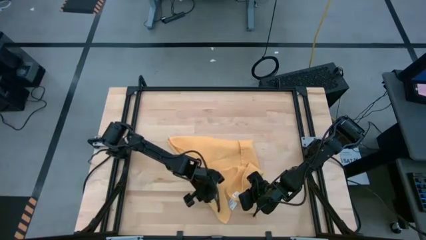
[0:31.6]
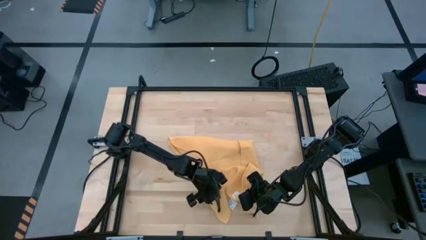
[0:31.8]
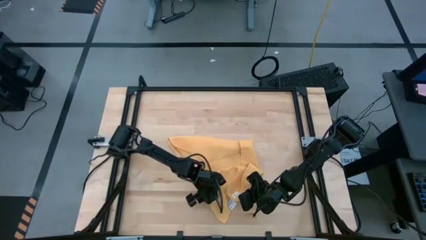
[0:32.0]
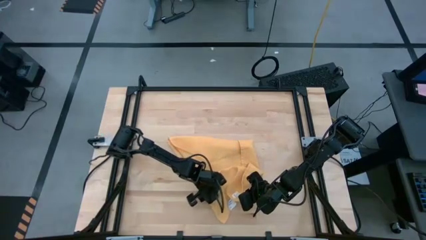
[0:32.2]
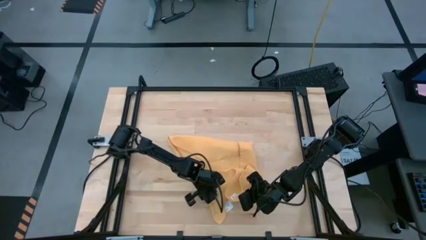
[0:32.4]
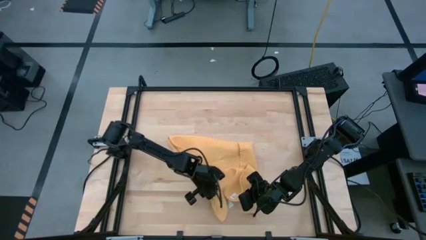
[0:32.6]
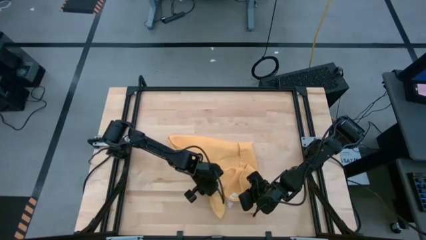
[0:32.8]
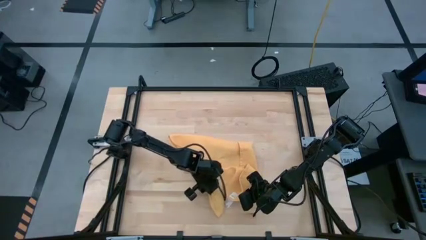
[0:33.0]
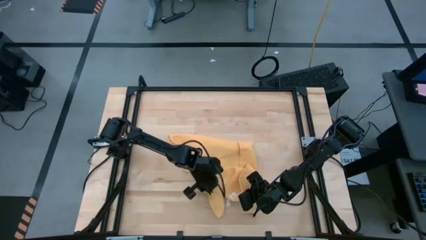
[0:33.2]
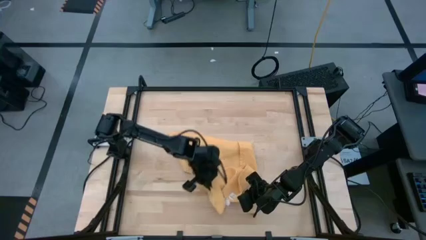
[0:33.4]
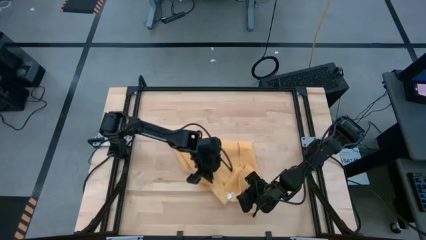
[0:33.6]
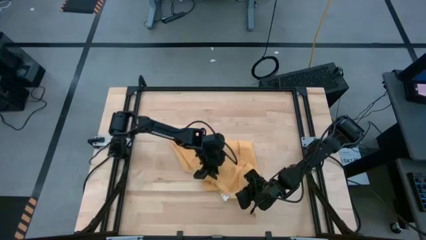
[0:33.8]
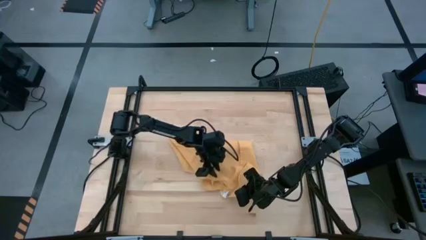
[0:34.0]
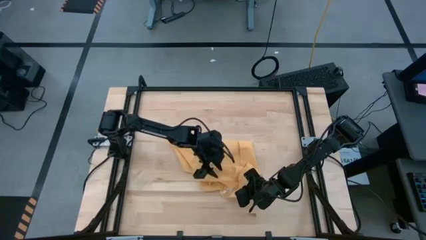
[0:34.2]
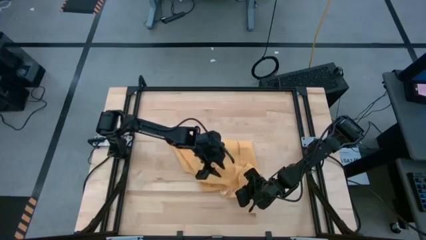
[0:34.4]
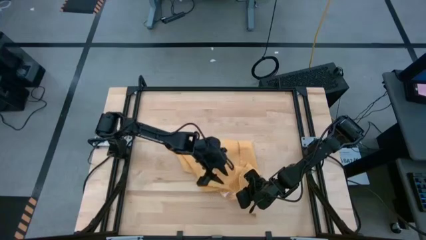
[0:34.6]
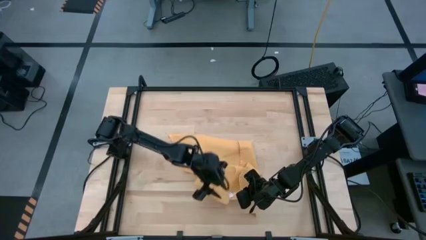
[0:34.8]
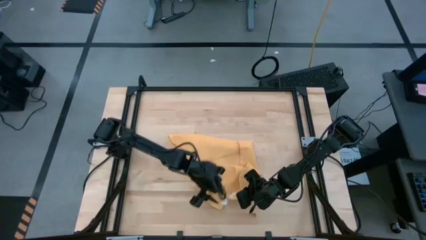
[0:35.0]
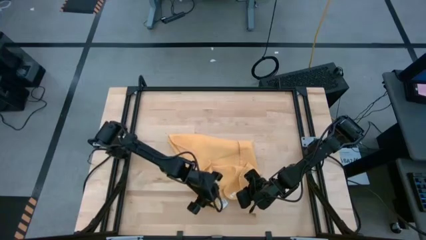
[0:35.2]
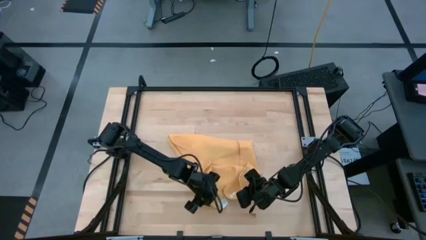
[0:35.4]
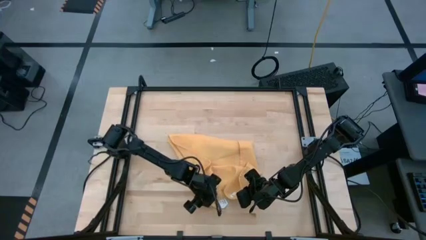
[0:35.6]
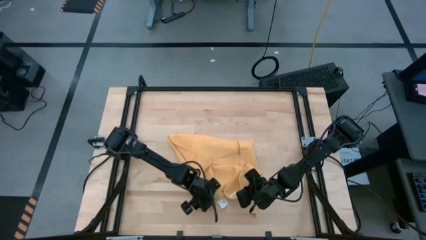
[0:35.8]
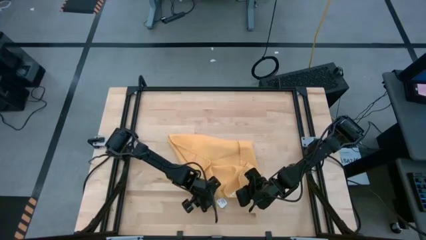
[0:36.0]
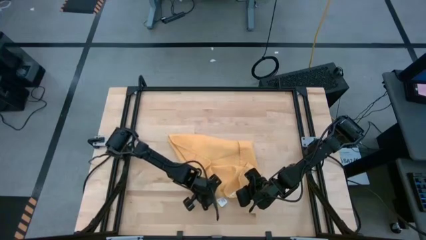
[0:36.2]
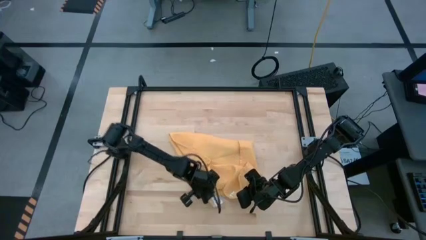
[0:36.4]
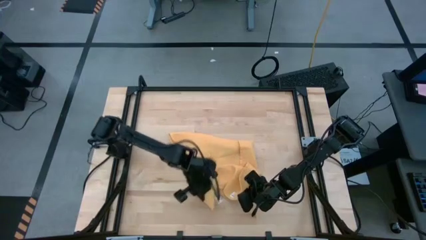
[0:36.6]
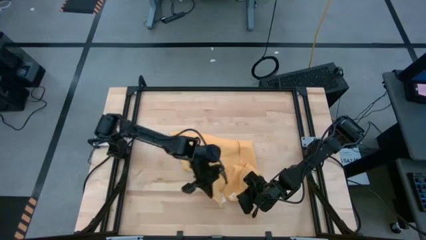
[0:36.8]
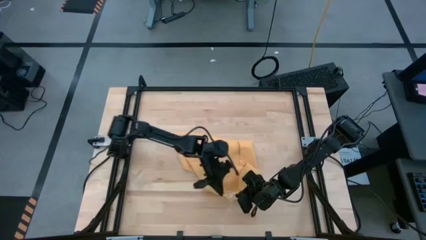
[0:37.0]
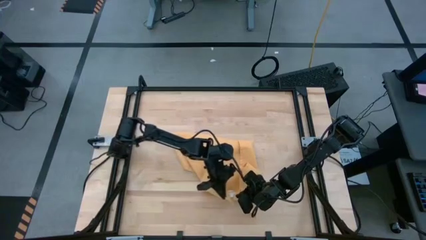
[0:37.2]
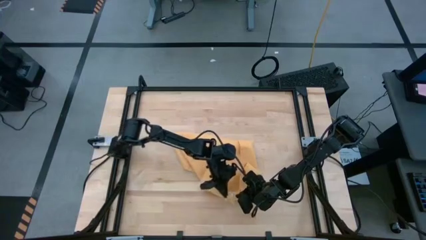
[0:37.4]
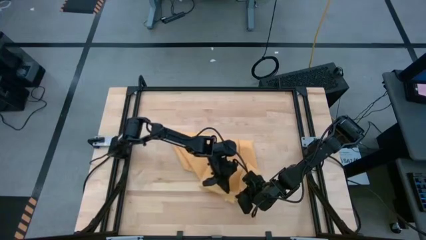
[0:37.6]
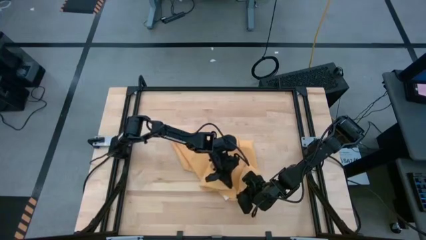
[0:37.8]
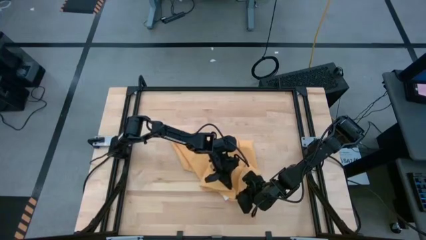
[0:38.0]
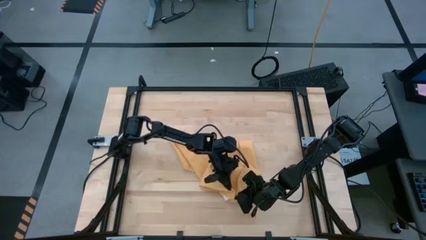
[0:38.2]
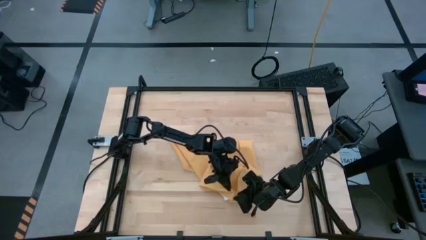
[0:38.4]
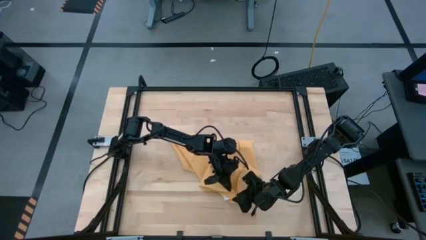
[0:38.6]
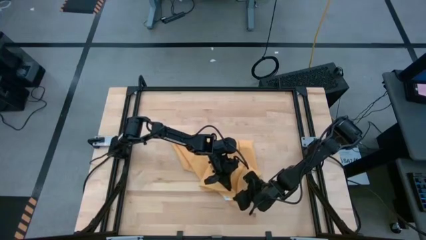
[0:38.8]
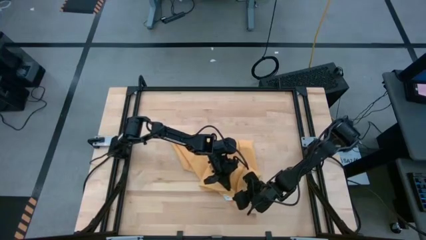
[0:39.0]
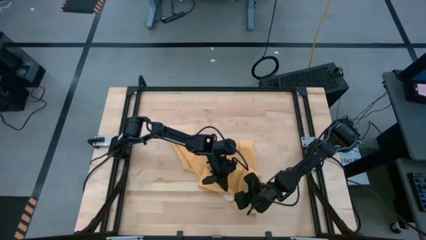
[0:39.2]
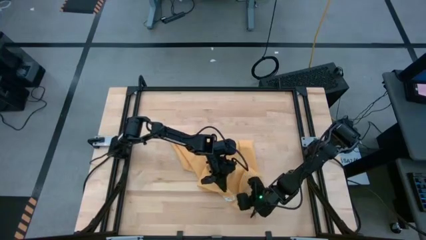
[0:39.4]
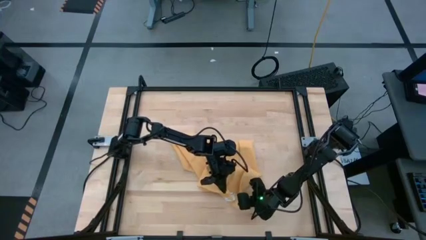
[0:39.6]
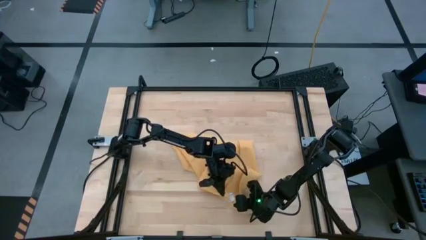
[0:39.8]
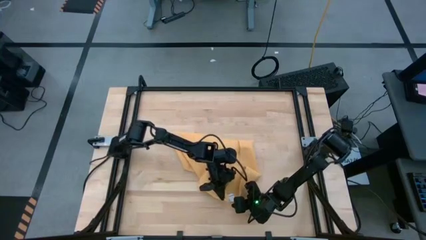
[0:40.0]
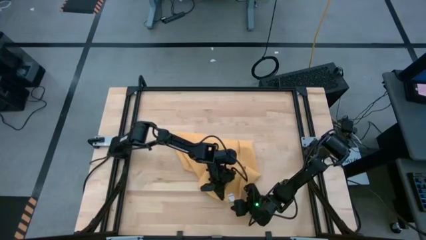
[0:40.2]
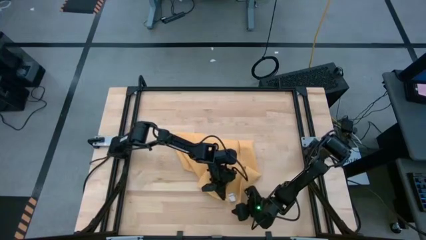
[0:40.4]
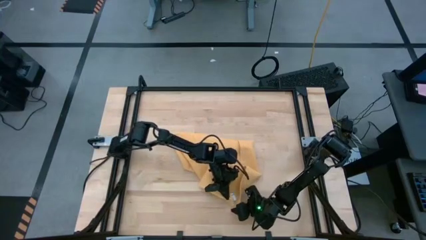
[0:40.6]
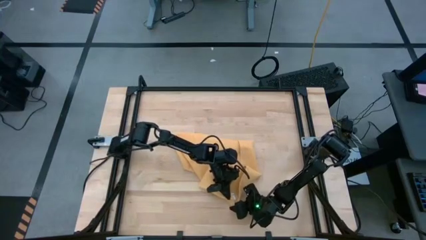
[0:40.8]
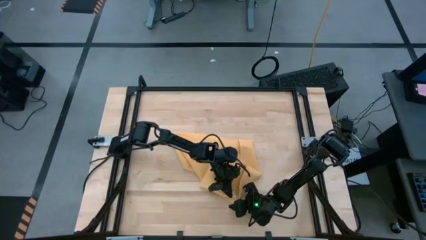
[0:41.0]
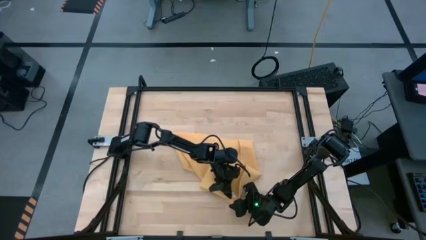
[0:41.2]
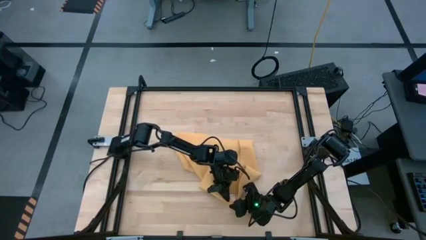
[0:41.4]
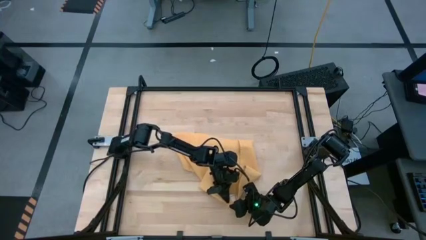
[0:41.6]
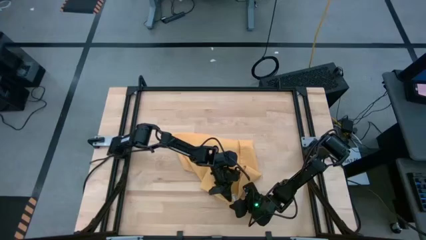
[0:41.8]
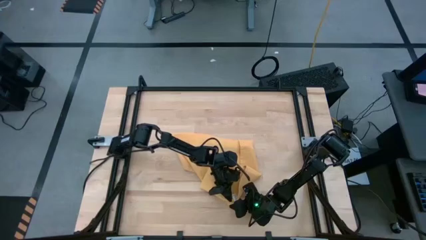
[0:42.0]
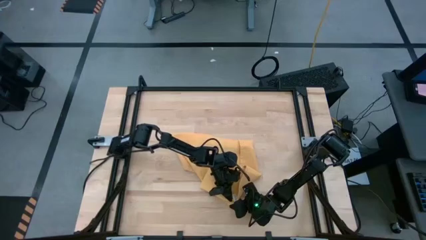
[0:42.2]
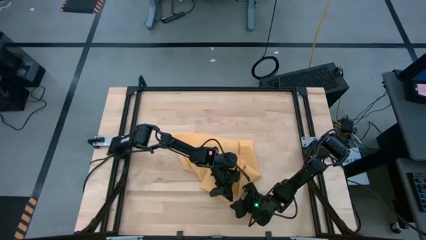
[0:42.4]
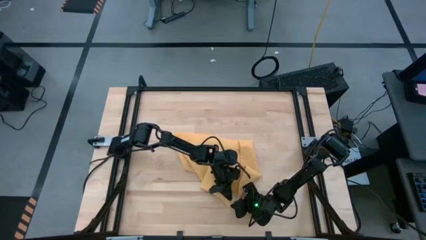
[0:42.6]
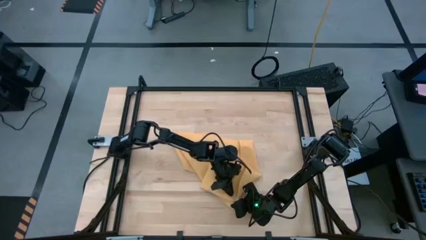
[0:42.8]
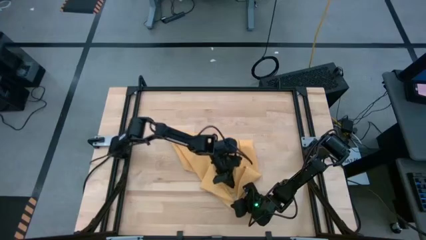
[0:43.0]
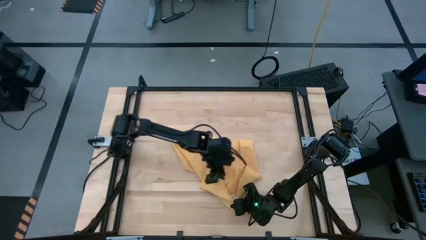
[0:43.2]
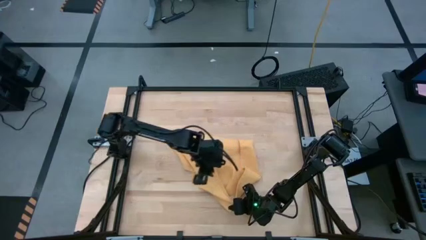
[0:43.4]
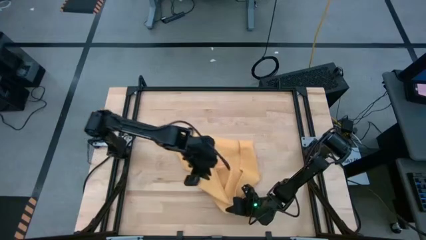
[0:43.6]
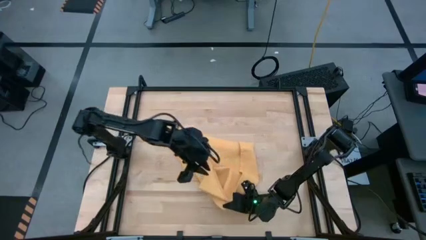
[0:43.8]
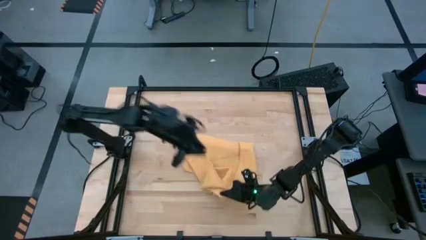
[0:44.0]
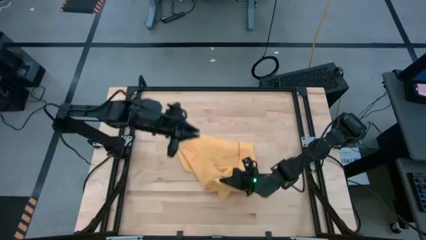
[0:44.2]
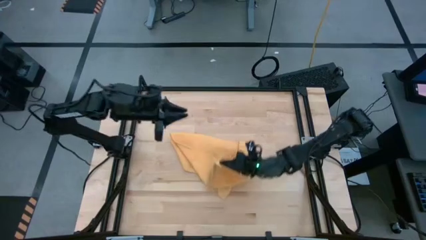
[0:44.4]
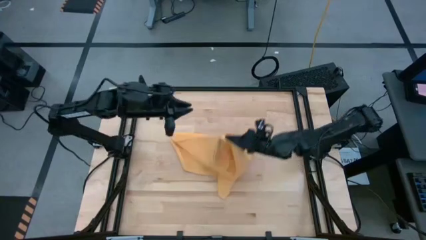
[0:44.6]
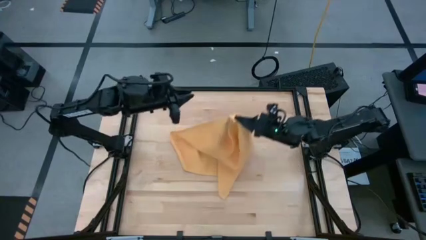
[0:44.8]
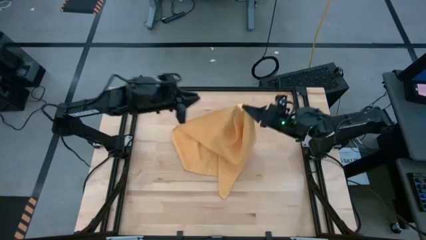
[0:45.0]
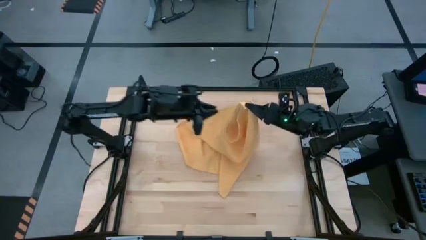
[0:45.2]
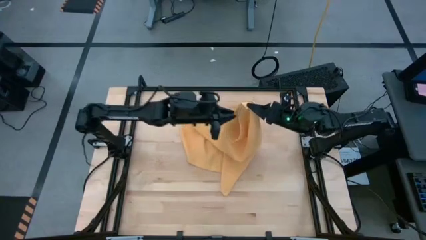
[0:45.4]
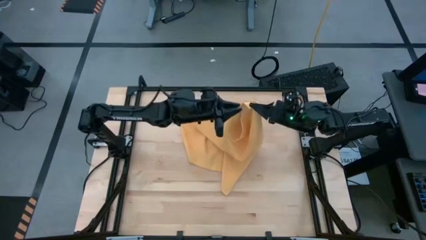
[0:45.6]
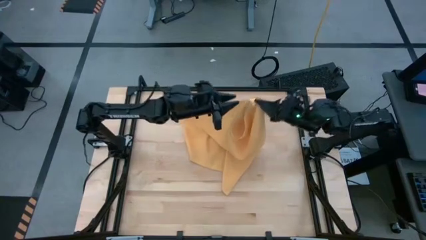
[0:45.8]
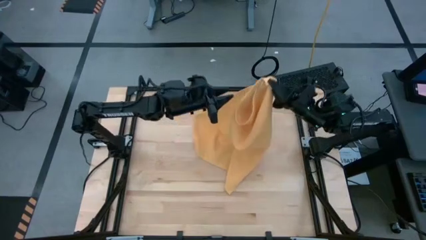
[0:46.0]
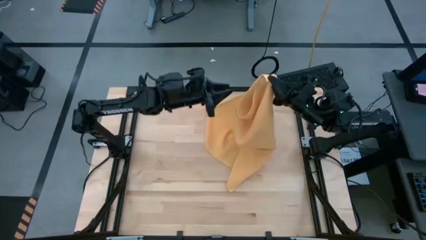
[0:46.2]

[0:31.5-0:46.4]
Task: Roll towel
Roll the yellow towel

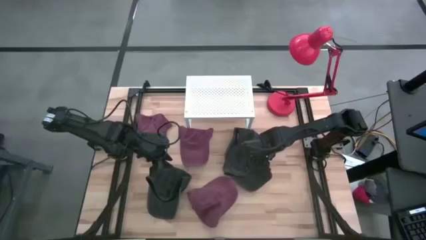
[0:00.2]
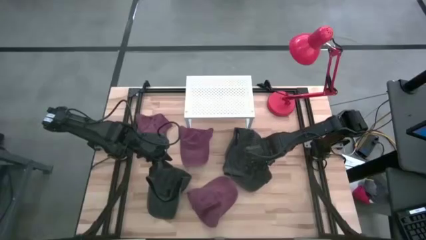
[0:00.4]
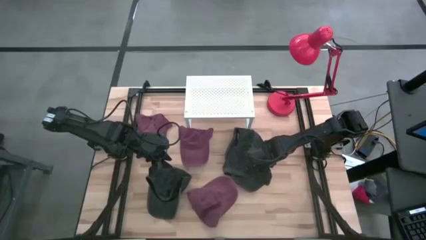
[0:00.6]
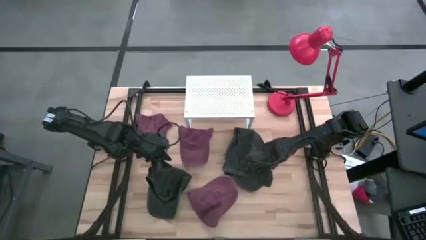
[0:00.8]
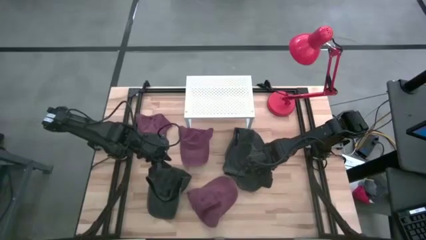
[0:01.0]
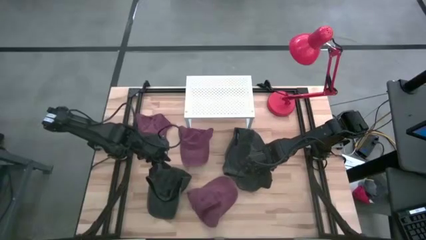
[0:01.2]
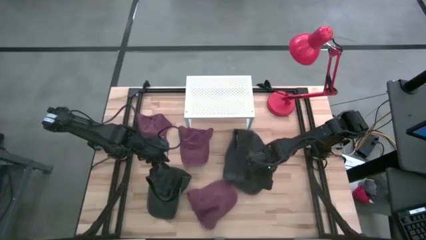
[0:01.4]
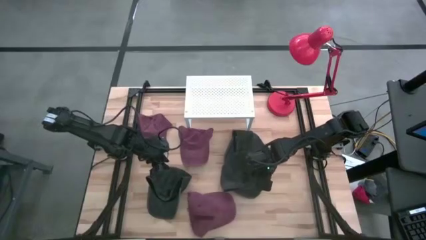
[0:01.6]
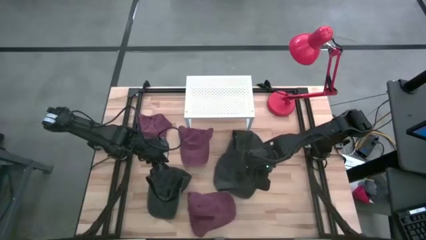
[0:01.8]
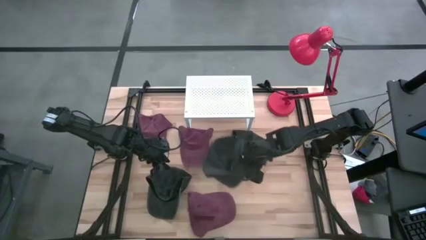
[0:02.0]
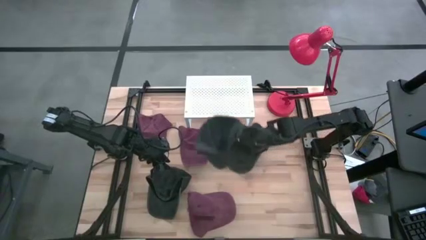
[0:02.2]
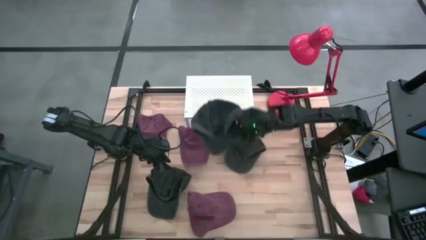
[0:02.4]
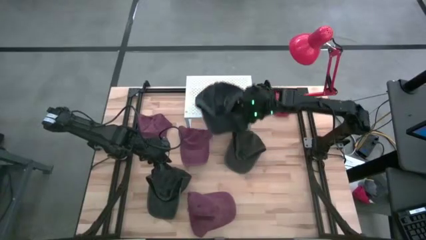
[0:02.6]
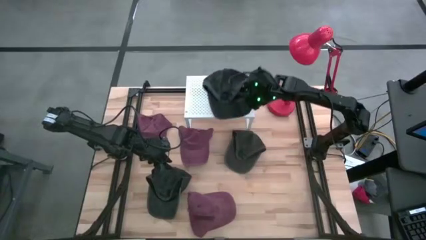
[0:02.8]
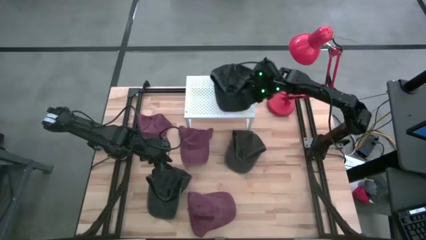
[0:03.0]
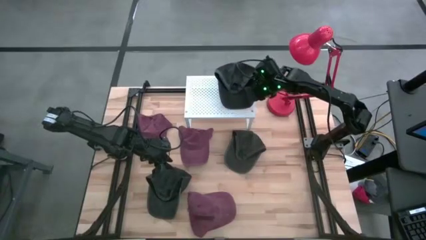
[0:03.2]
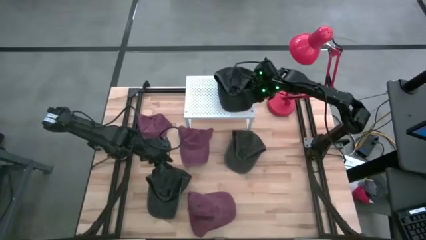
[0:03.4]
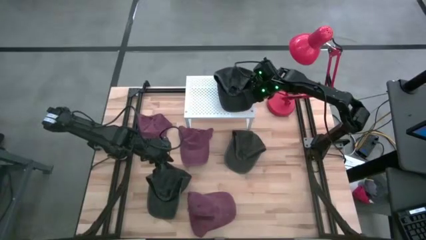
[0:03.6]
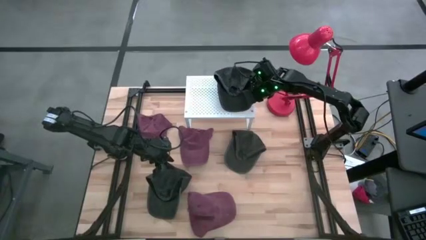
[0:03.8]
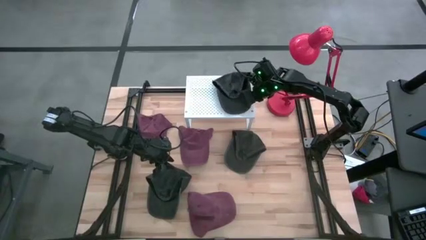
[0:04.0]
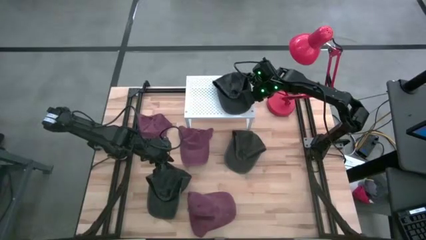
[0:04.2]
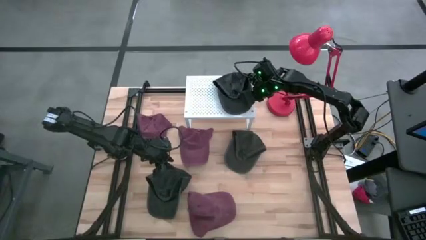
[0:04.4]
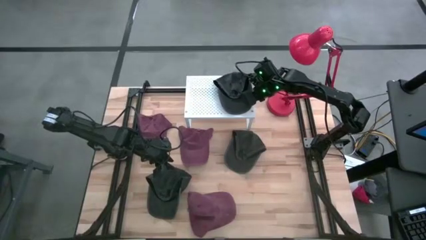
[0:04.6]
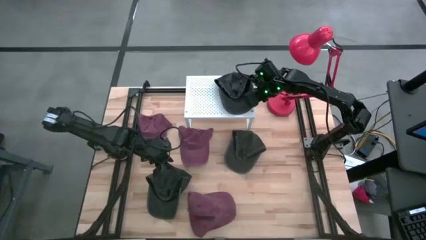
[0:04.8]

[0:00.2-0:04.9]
Task: Pick & Place hat
Put the middle black cap on the shelf
